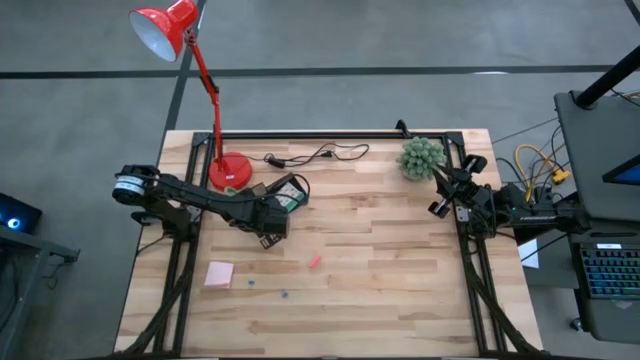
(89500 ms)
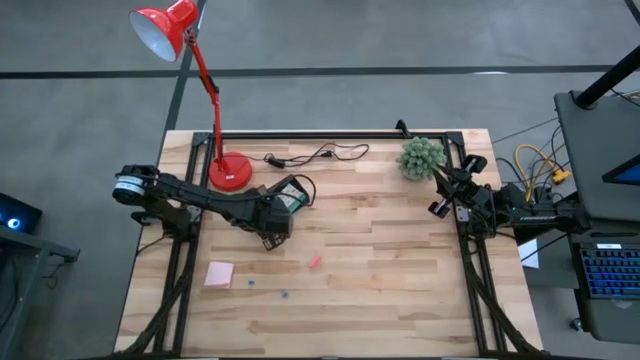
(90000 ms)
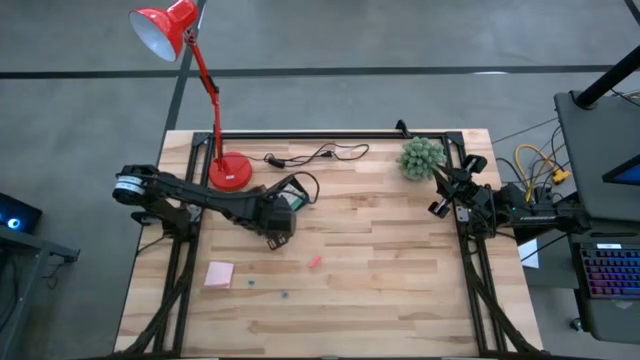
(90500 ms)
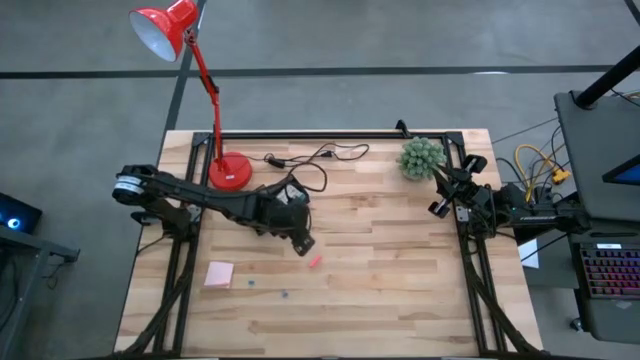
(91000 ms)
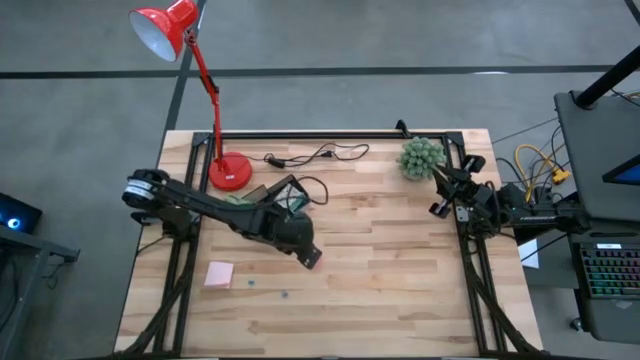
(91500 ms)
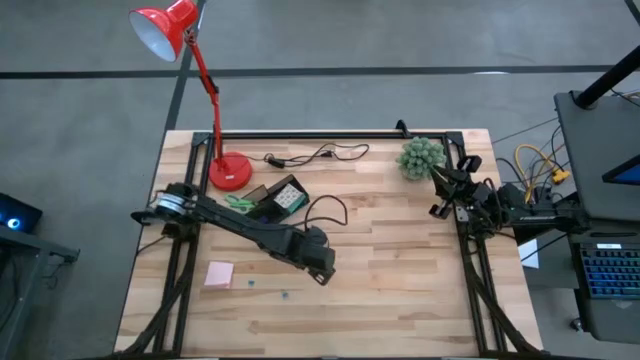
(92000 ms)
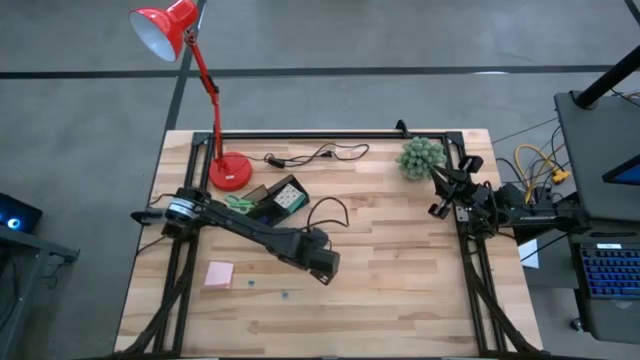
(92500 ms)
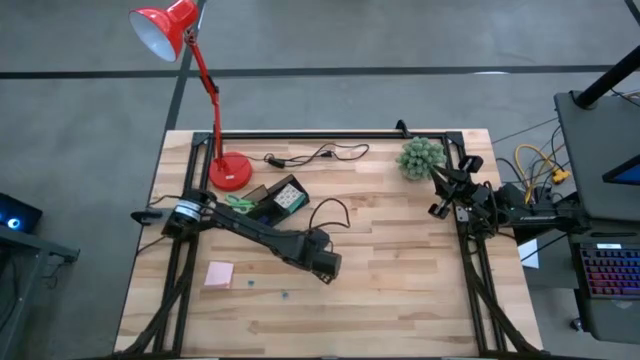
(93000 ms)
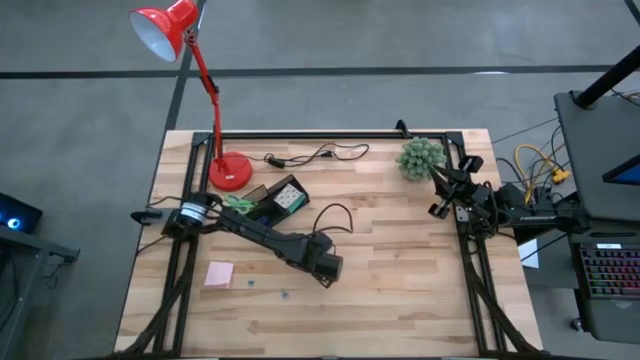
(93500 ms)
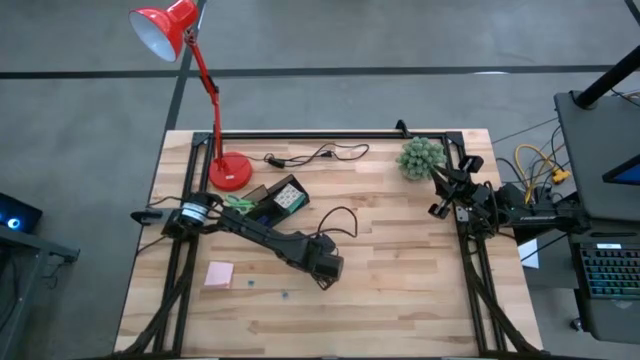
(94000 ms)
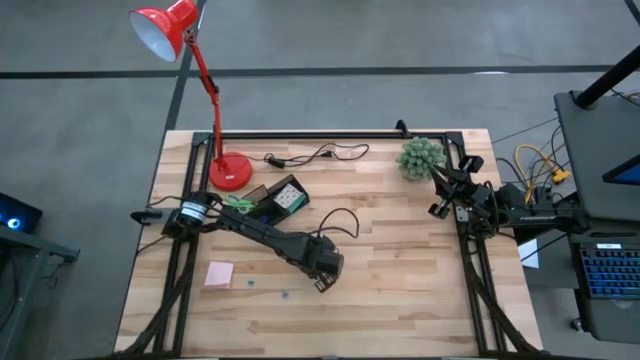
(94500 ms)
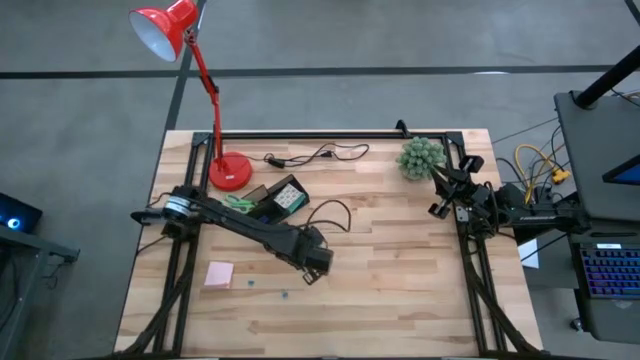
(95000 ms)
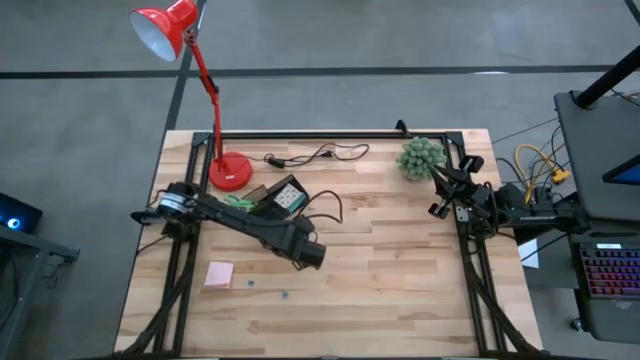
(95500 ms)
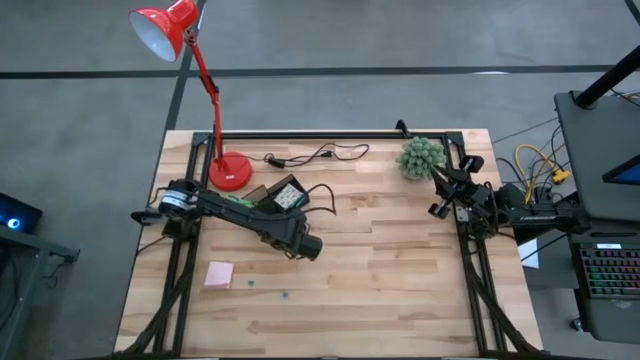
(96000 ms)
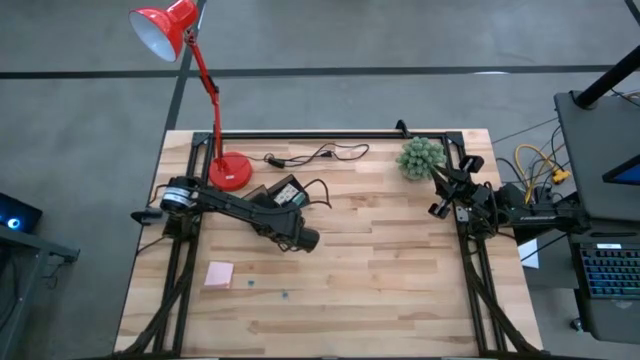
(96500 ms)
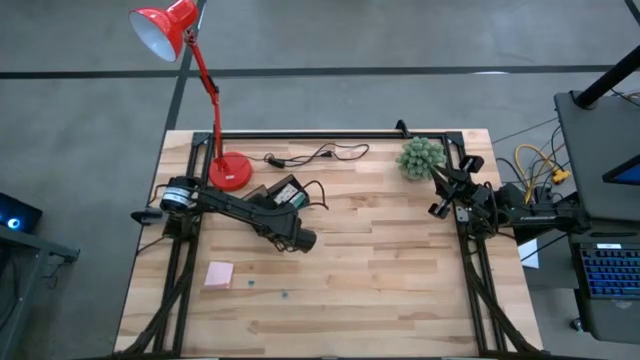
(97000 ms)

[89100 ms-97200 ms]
Task: Pick and place office supplies into organizer
Put the pink eraser into the desk organizer

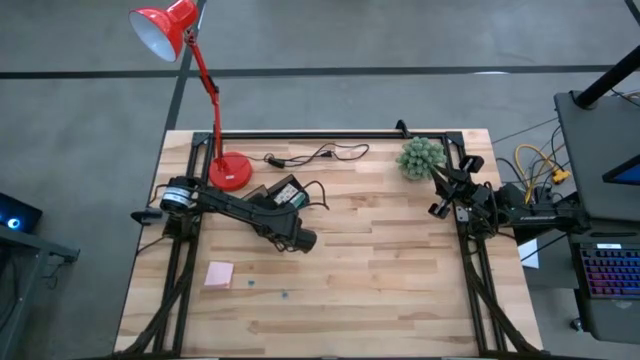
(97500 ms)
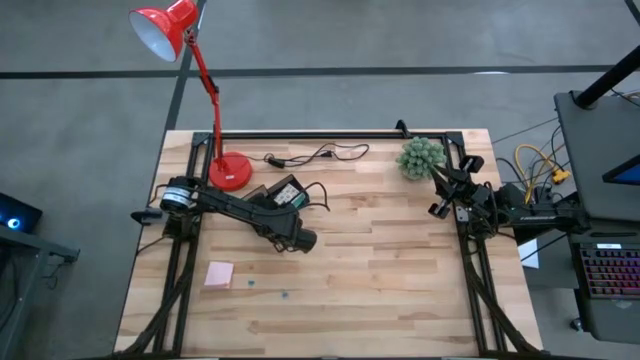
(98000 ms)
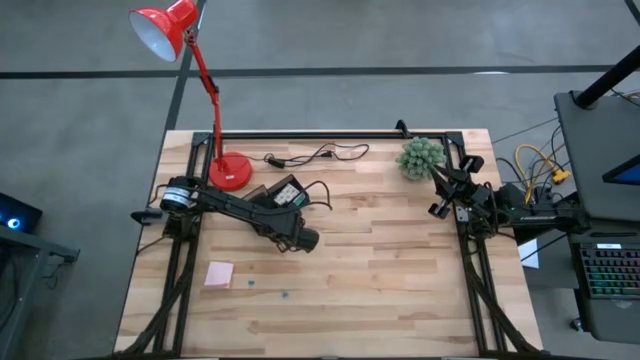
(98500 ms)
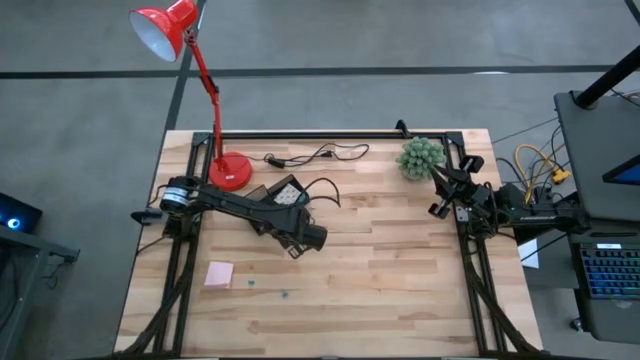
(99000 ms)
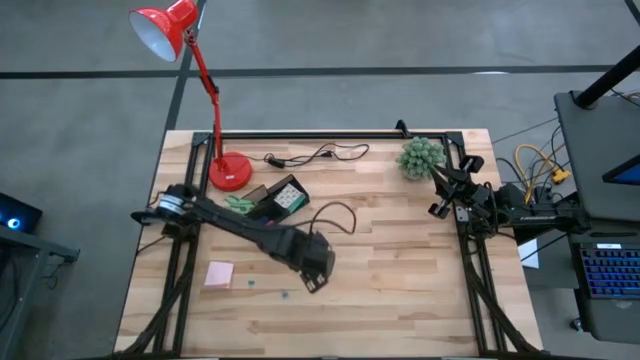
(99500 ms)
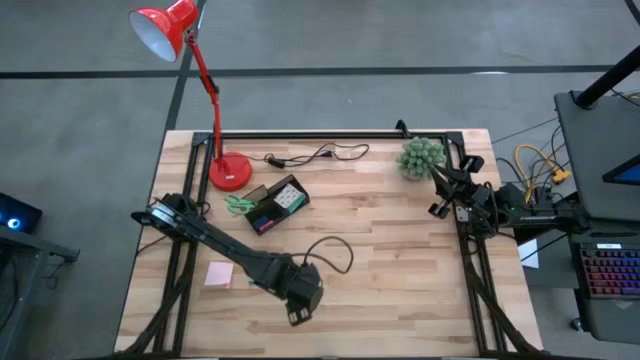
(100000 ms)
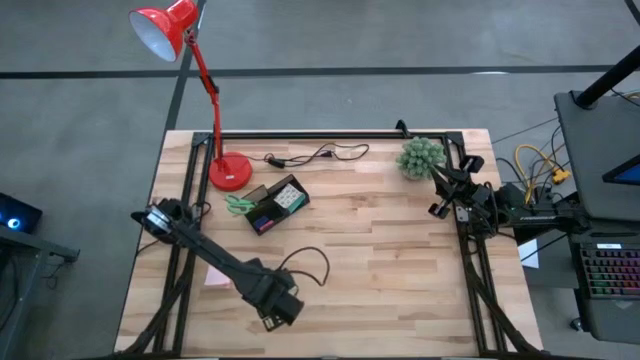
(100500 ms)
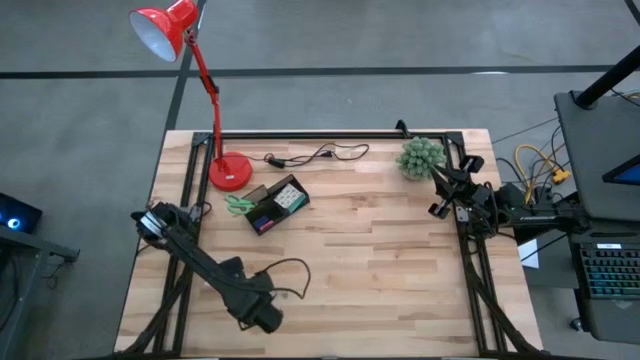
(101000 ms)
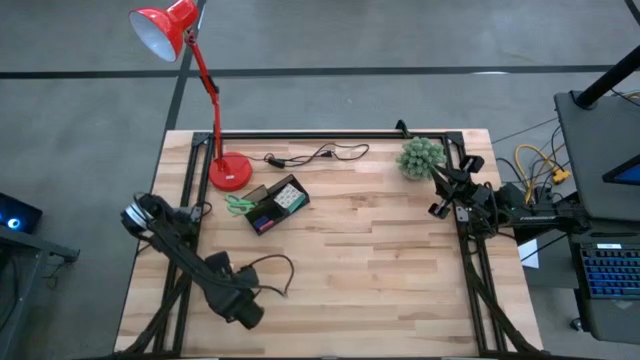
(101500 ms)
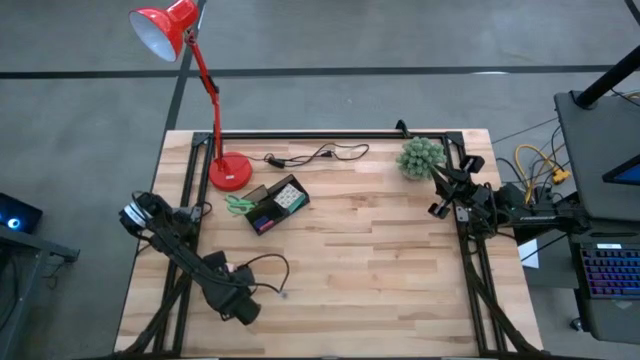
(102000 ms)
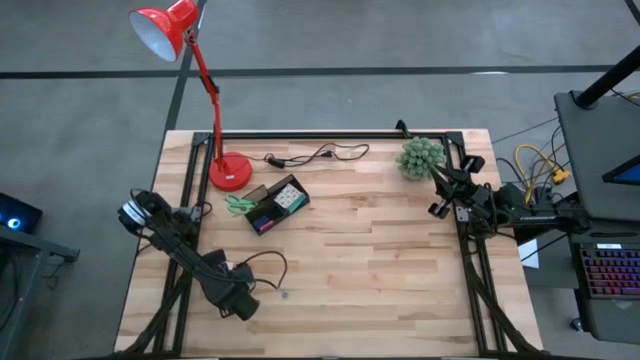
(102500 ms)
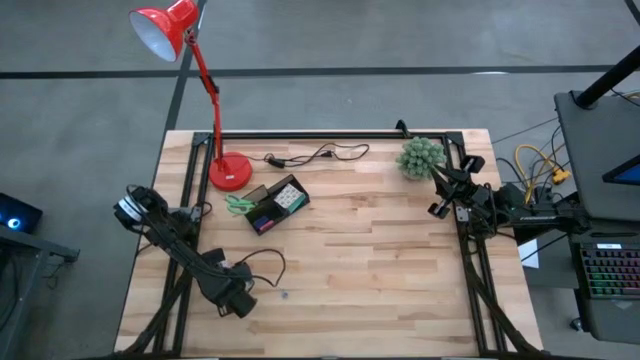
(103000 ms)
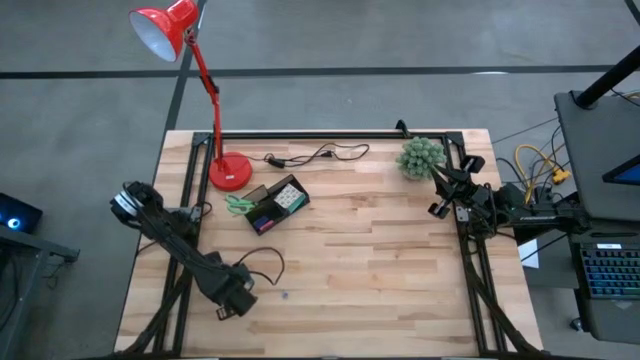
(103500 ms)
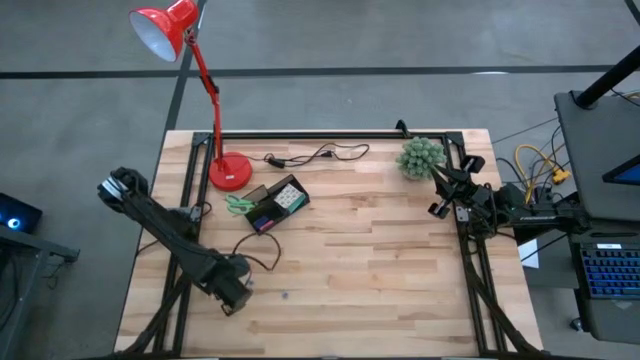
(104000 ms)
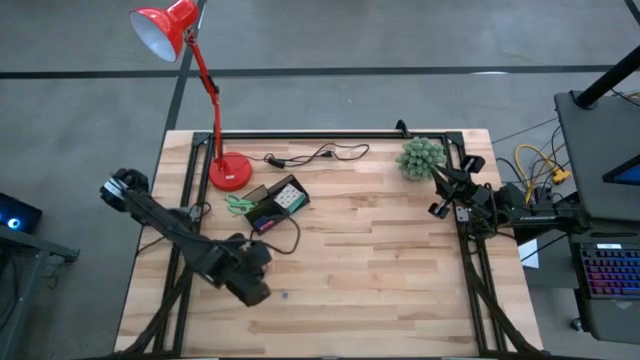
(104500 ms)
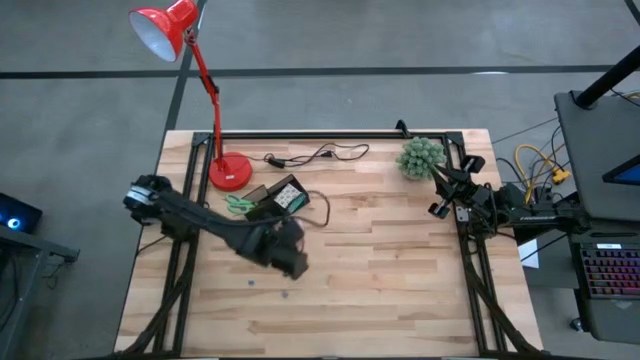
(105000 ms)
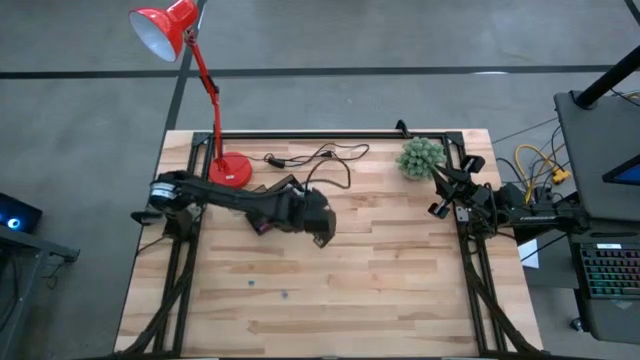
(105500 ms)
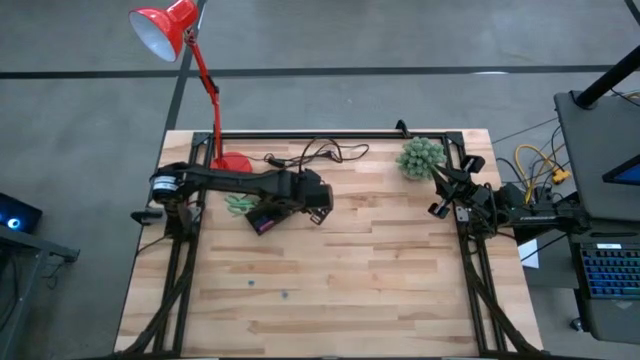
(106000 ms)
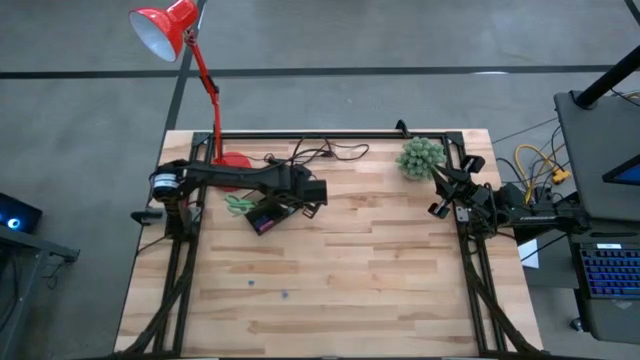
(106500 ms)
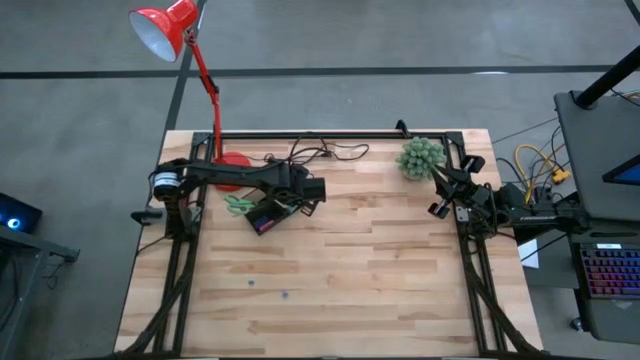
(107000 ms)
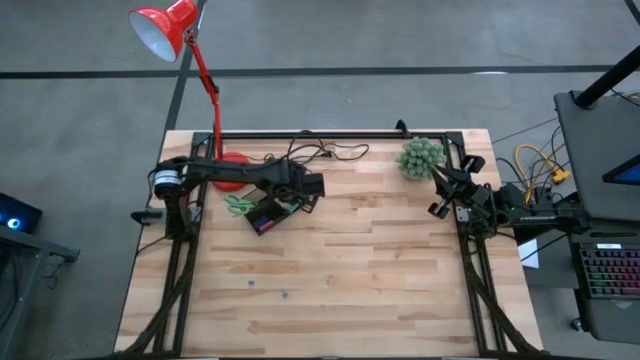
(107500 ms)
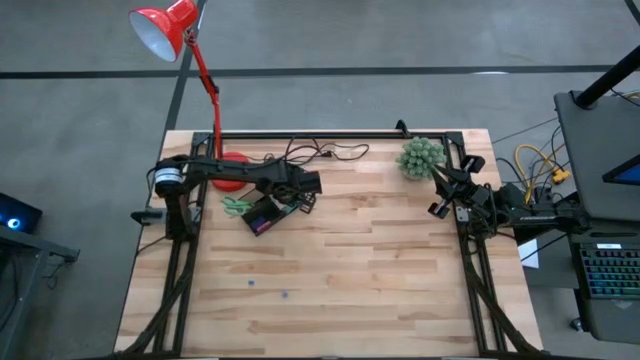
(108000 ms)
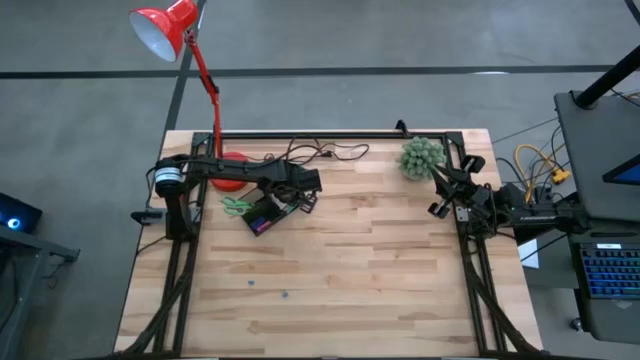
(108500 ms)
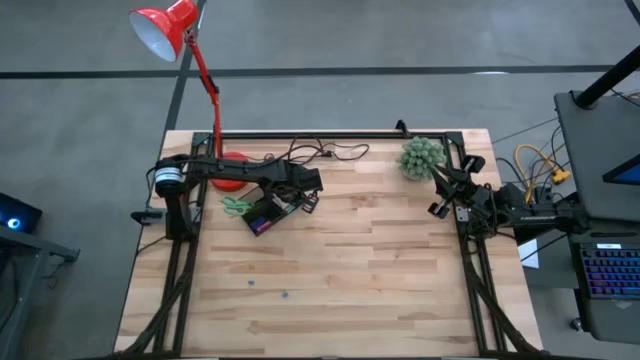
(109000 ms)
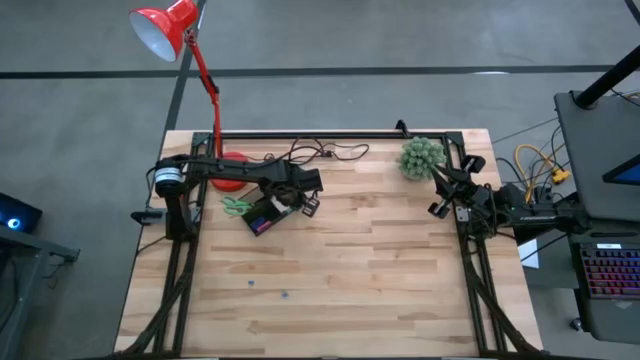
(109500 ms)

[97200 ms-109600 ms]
Put the pink sticky notes into the desk organizer

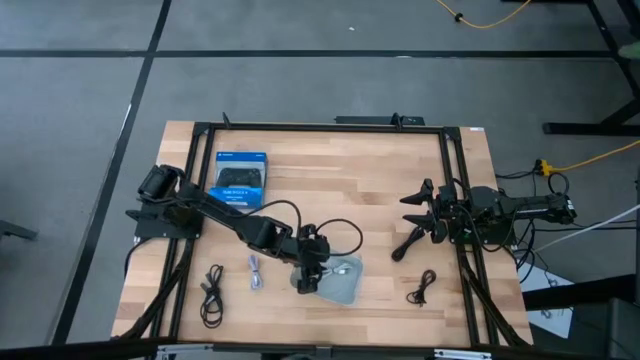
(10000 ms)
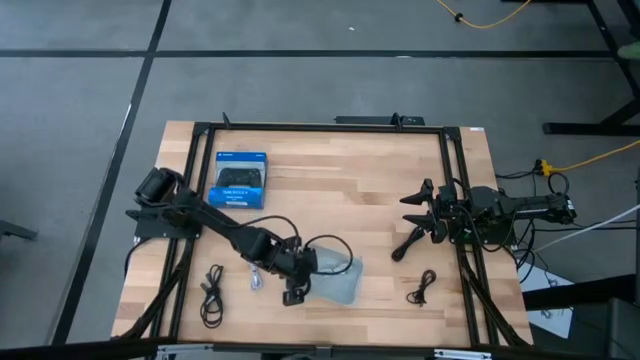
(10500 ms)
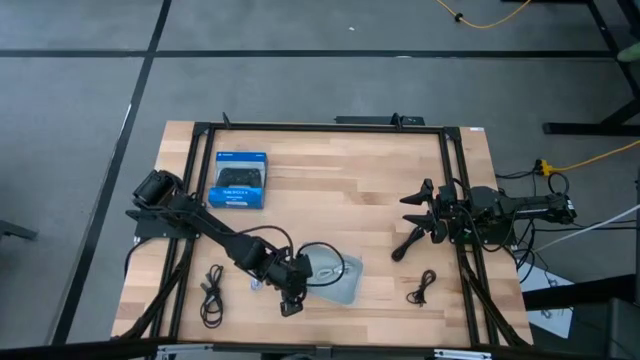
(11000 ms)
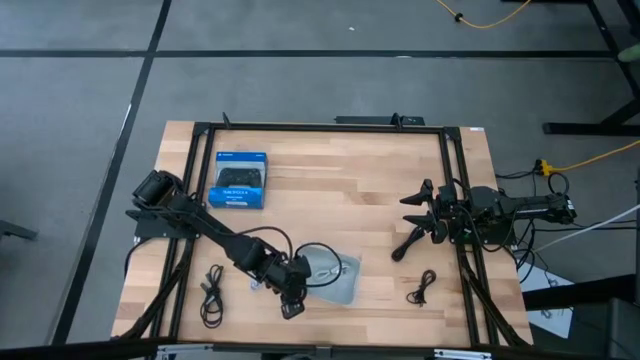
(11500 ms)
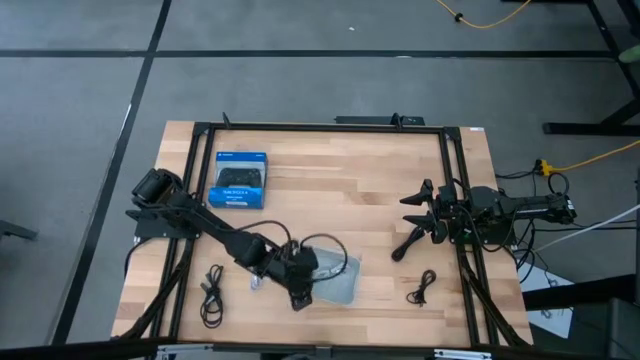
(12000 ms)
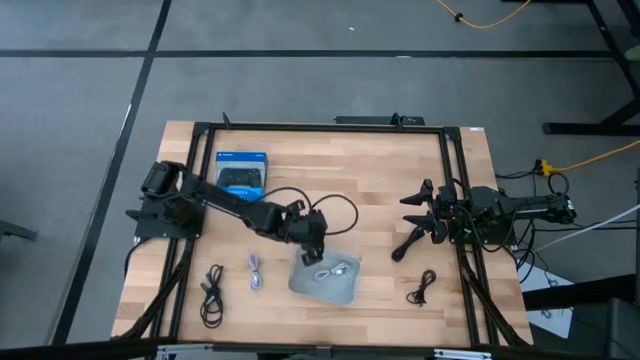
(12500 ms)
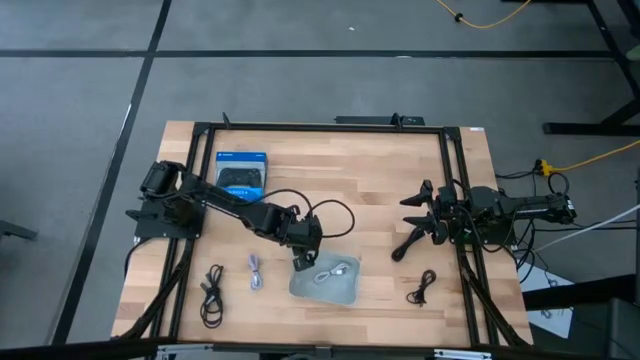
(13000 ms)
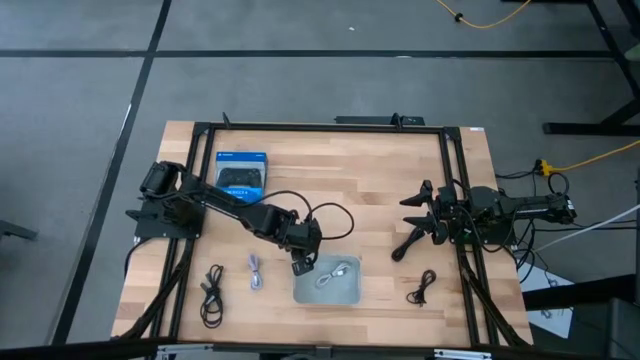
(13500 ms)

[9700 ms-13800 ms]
Task: Pick and place USB-C Cables
Adjust the gray bin
